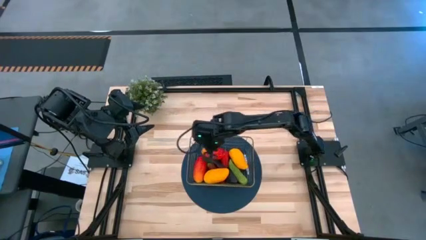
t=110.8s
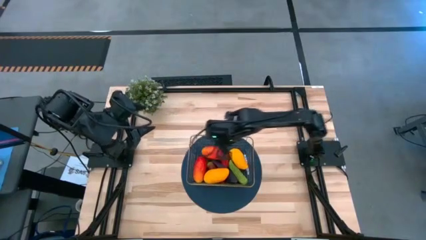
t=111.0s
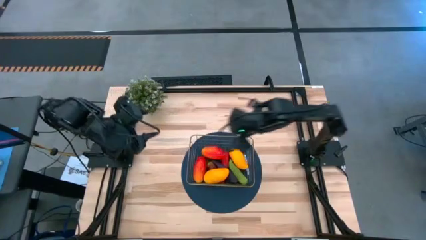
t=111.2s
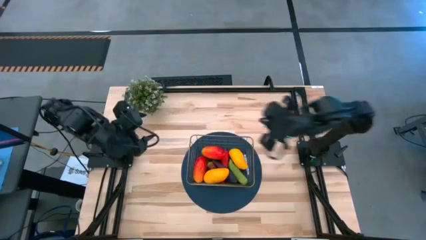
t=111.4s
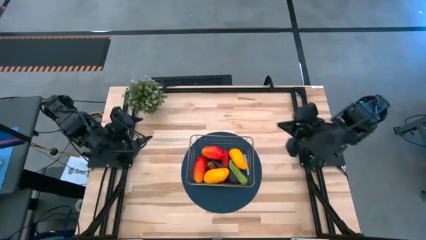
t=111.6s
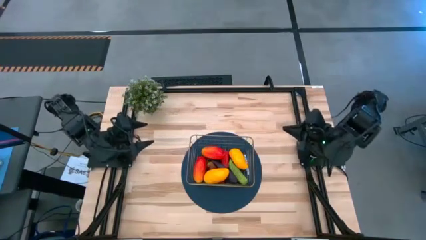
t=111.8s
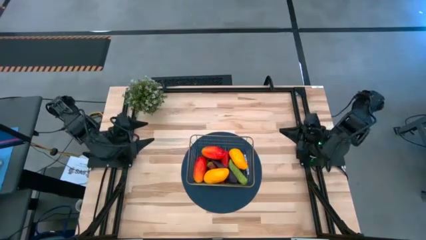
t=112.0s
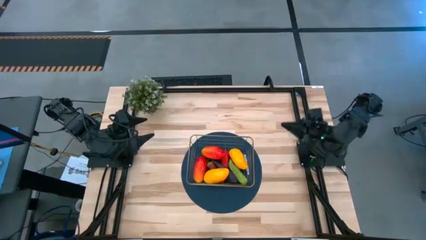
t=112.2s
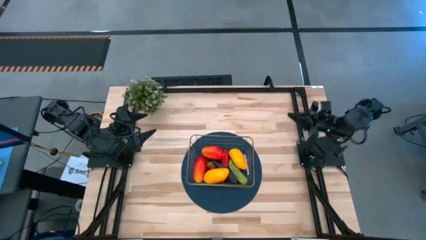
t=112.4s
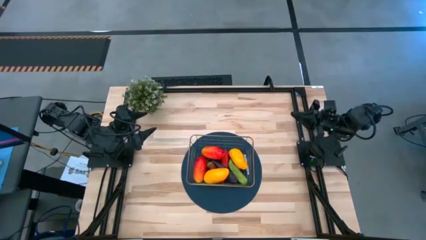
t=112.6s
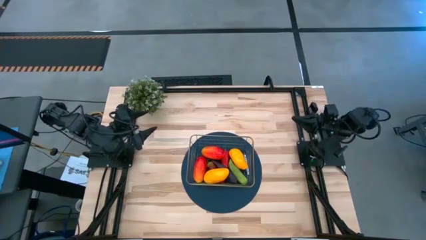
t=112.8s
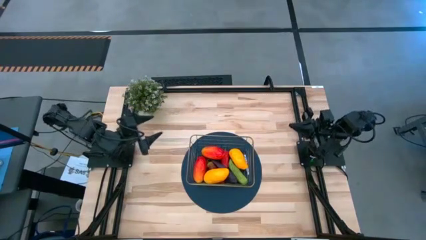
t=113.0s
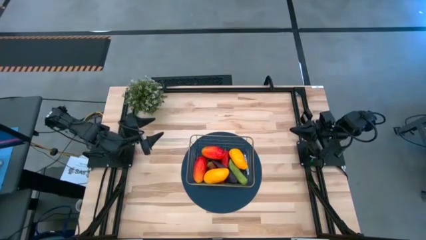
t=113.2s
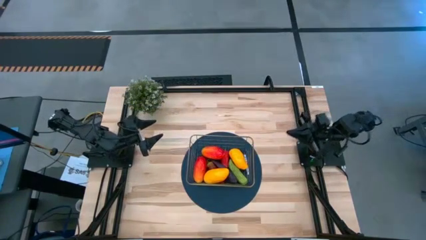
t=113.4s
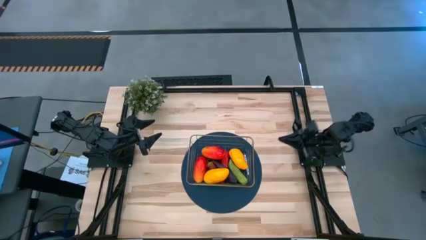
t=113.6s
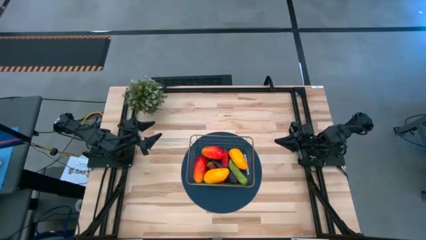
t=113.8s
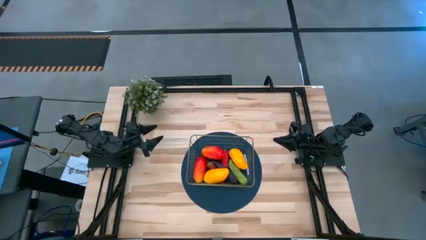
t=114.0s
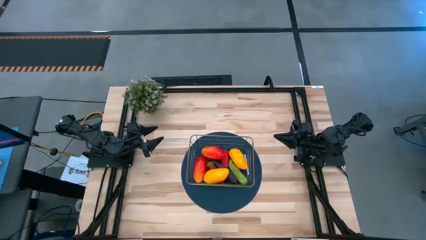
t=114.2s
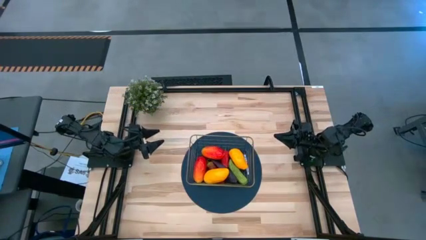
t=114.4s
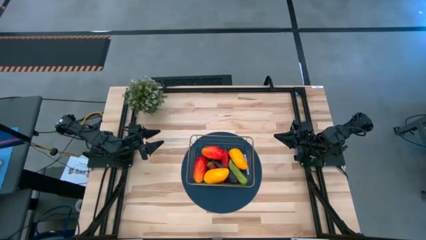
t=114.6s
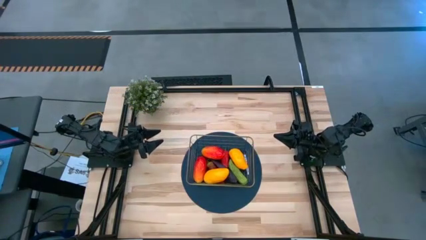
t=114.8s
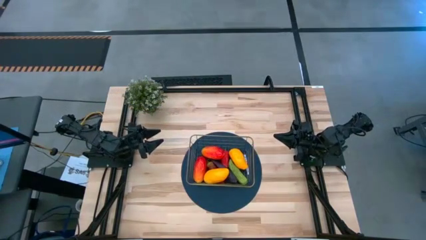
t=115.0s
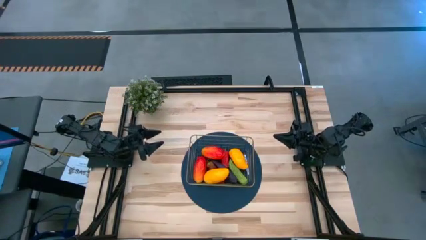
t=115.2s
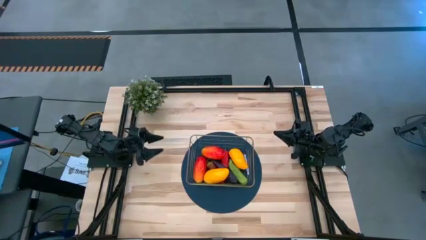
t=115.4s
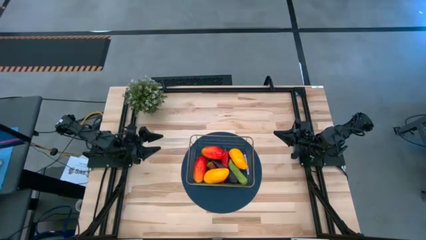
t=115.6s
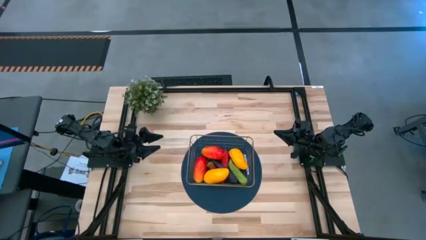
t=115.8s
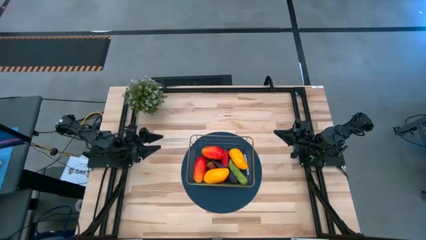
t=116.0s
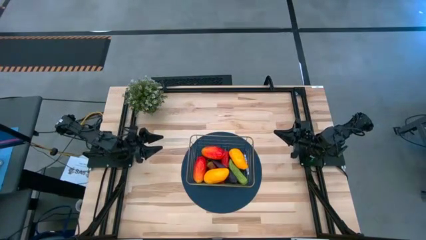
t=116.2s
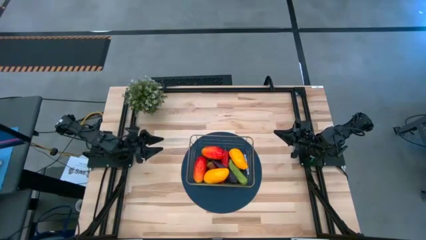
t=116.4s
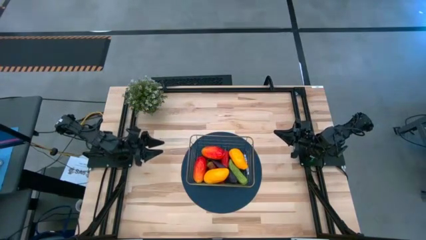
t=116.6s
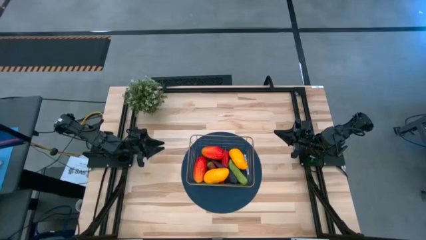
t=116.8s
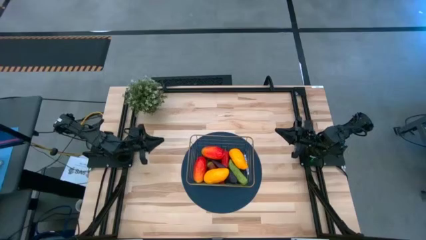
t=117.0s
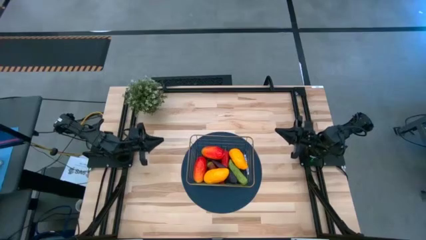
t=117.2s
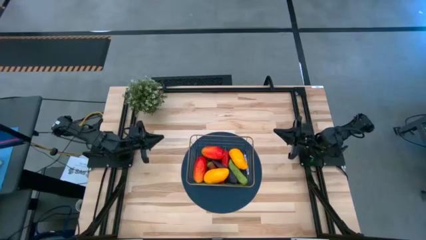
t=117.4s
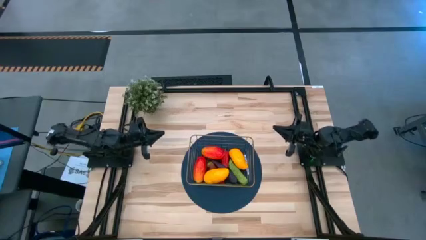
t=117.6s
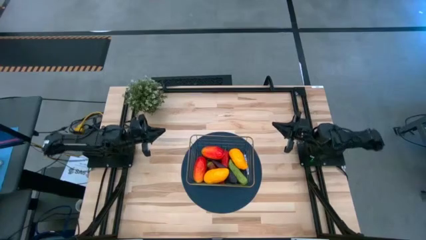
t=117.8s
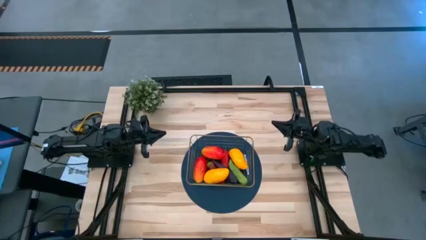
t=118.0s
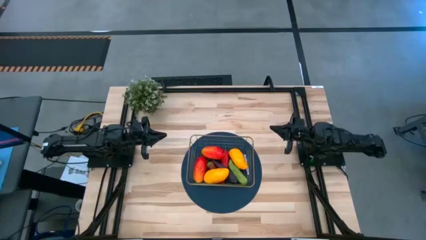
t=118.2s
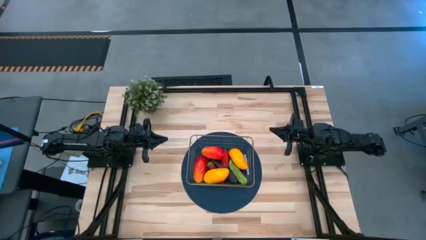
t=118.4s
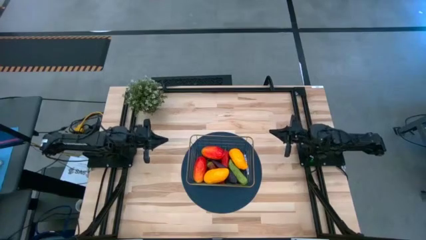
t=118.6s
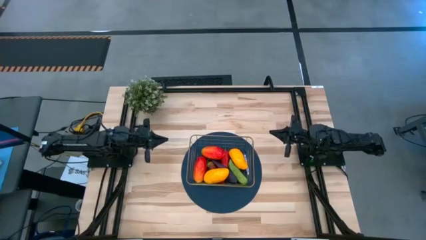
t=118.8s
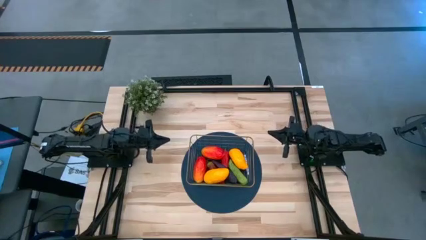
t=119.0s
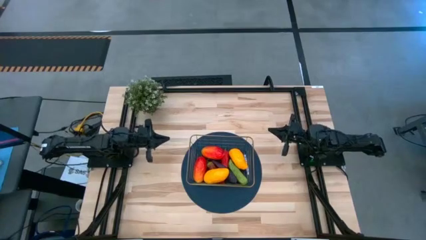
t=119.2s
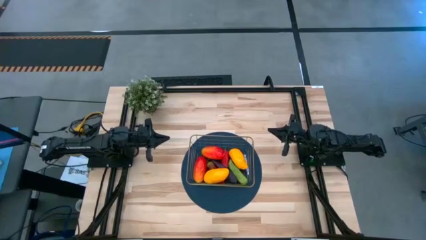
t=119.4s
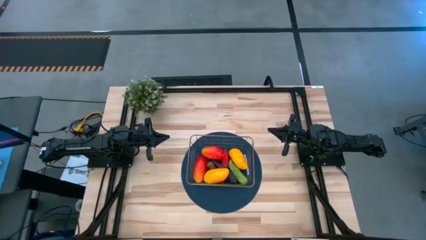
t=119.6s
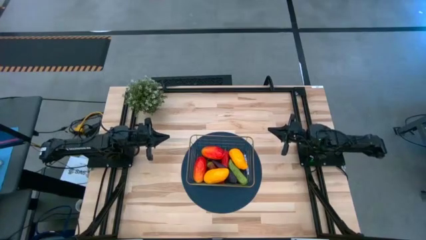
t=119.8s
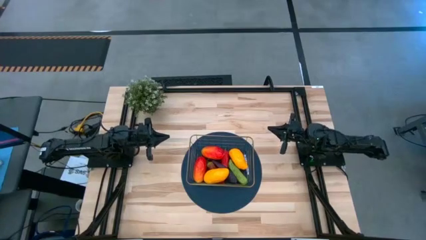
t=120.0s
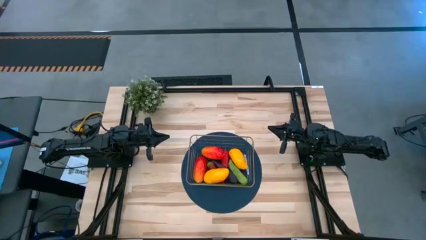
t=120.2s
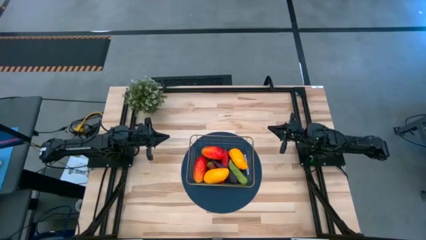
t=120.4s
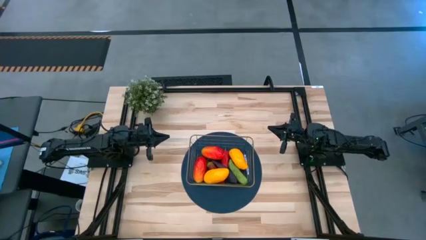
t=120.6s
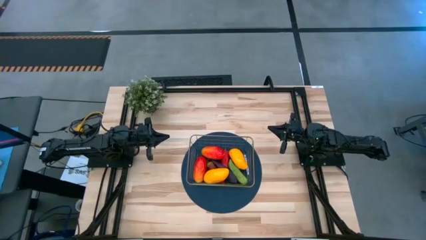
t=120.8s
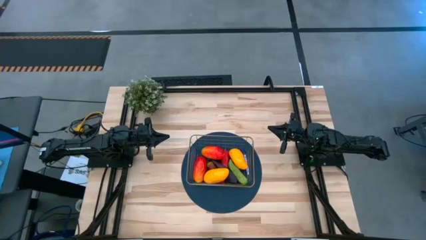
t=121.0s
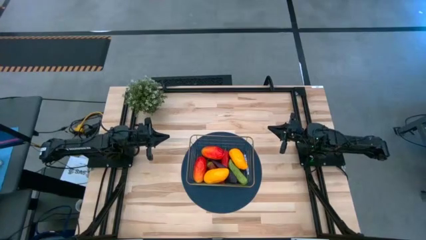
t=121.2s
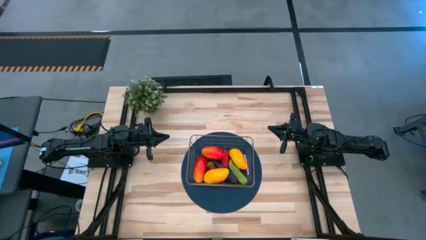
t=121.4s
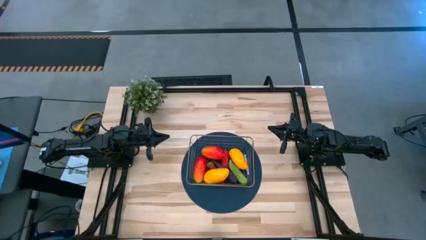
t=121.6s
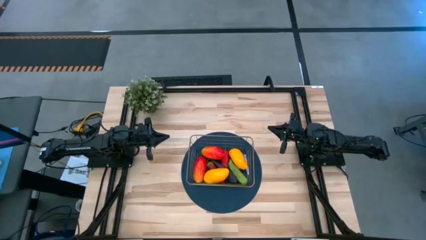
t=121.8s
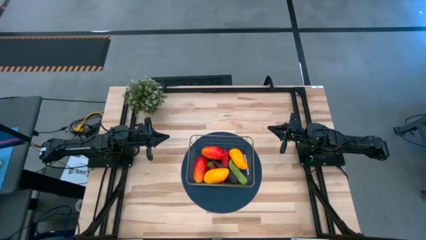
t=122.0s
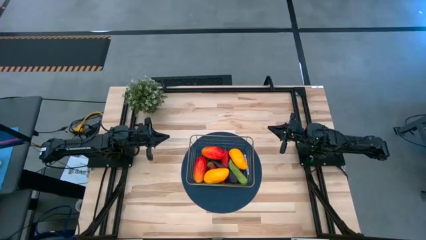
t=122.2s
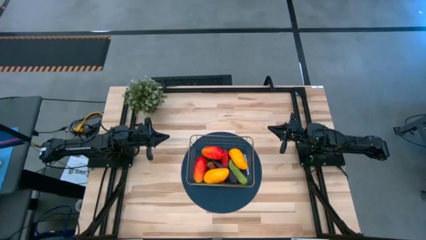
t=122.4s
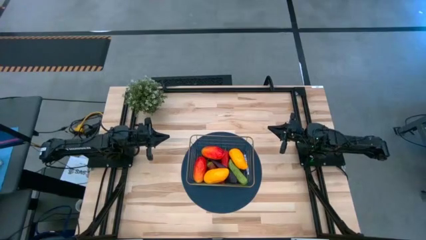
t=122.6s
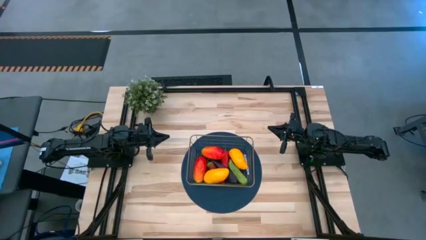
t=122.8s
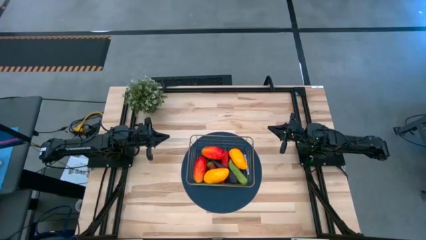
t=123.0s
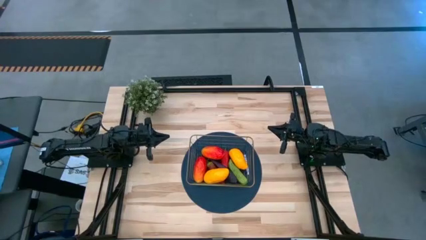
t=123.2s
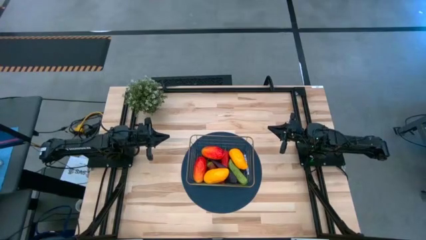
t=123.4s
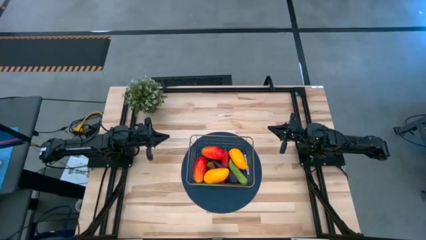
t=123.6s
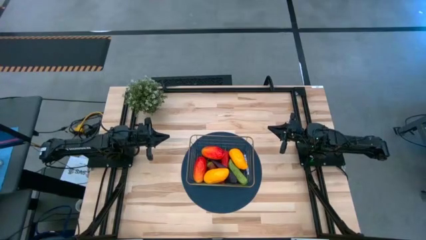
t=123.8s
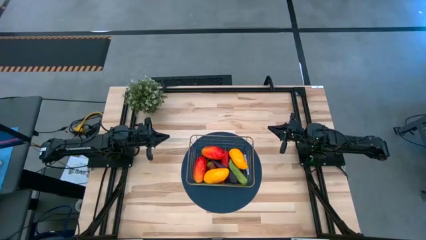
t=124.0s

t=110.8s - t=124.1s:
Task: Build produce basket
Return to Home Position
